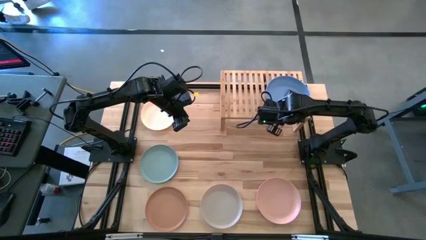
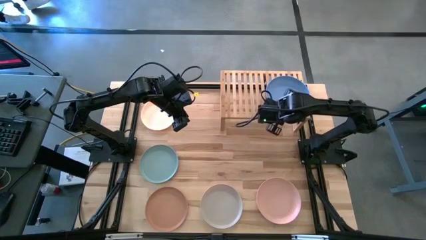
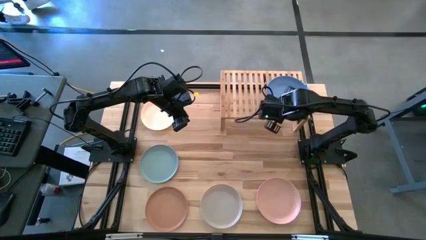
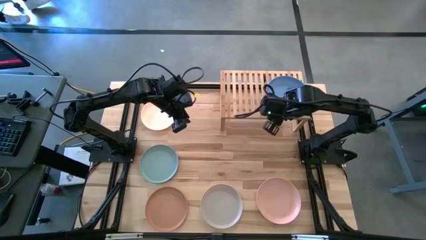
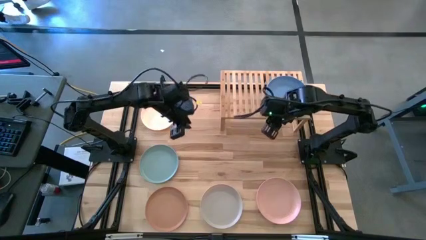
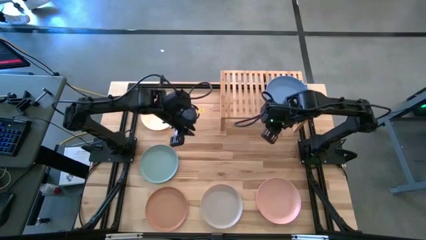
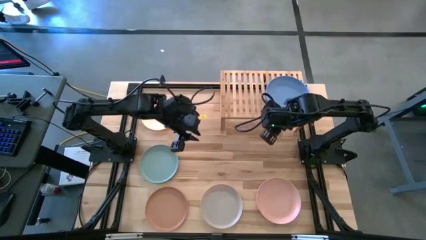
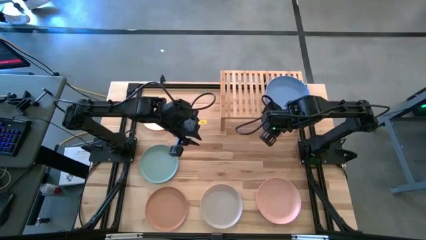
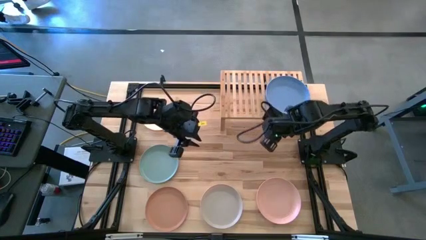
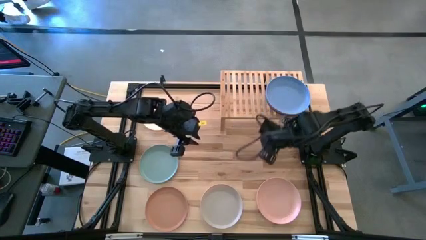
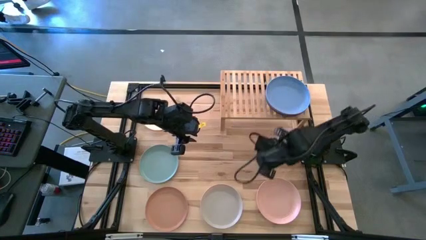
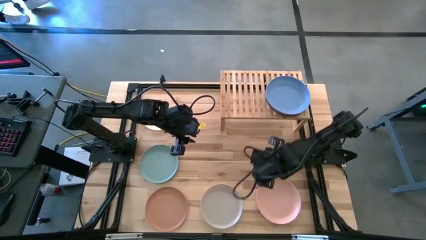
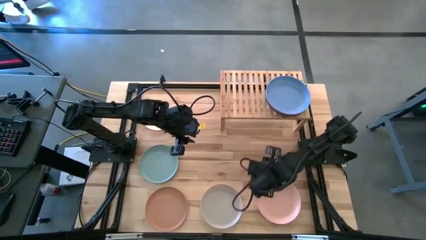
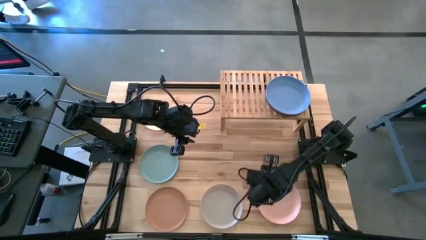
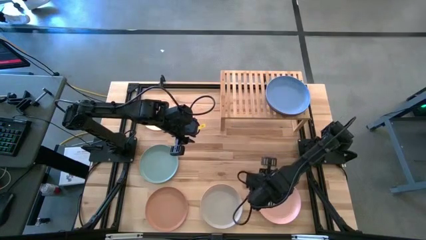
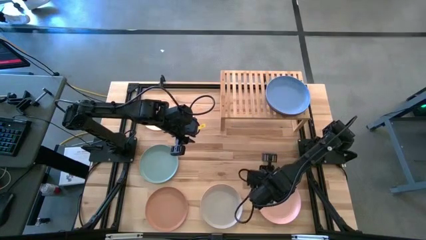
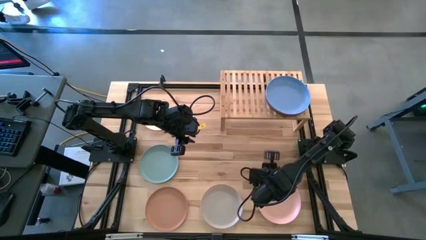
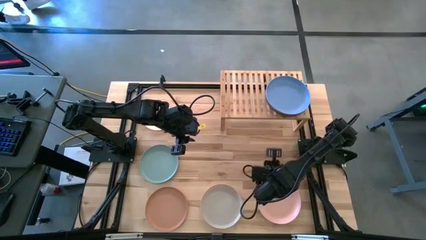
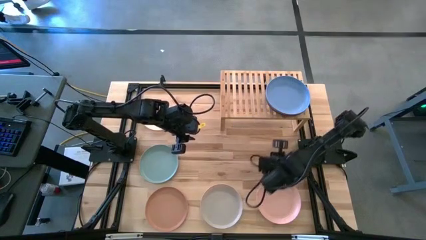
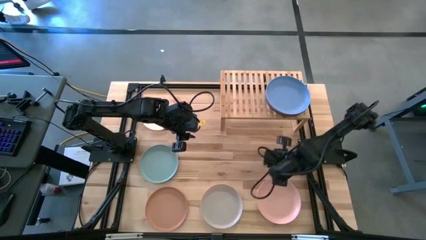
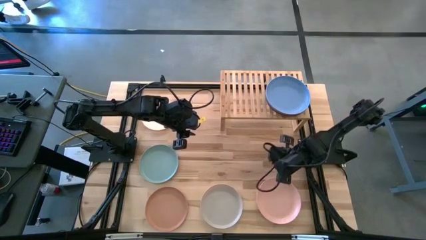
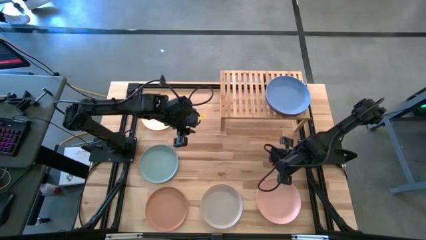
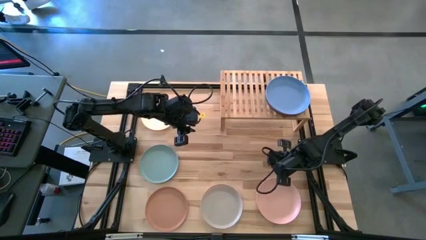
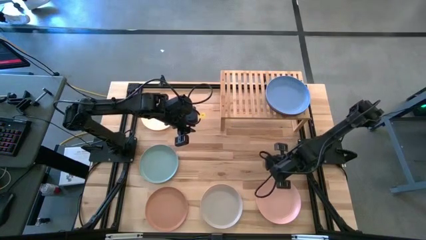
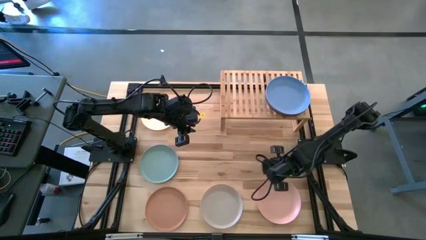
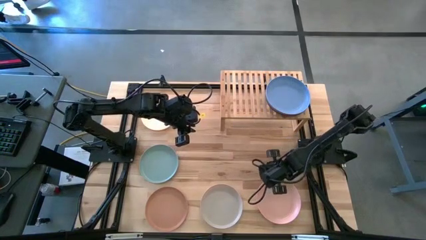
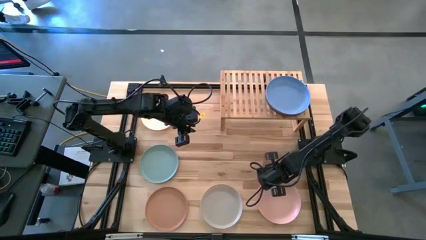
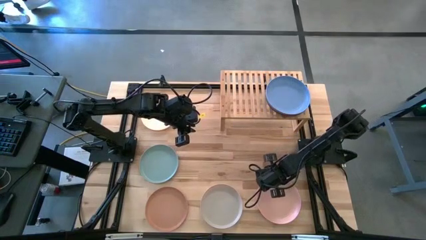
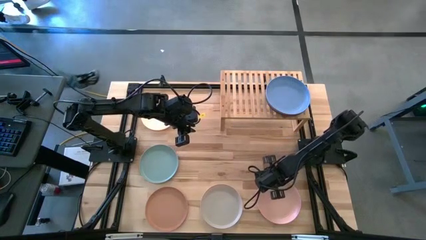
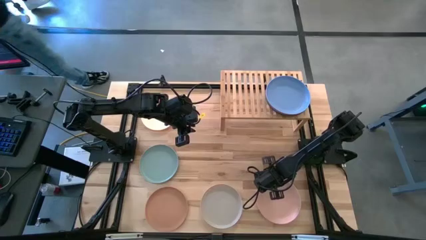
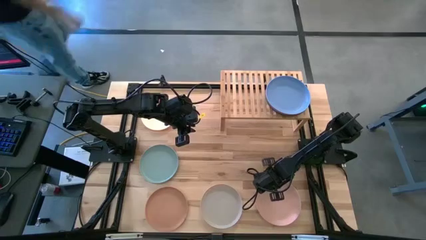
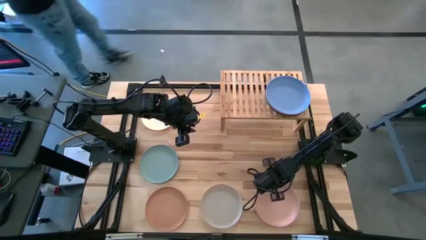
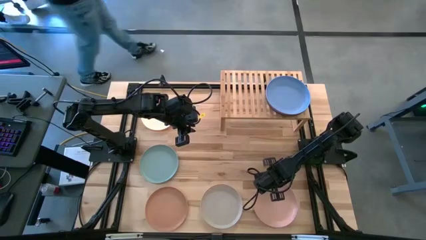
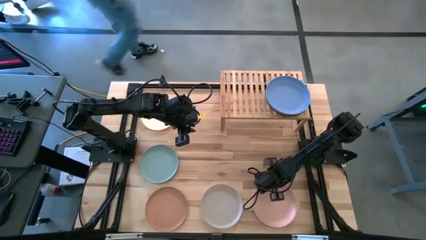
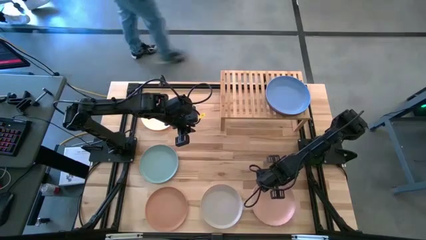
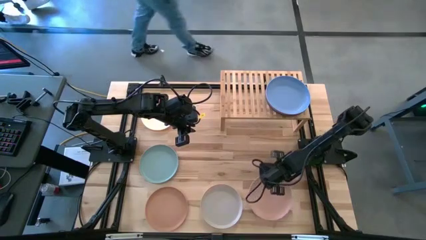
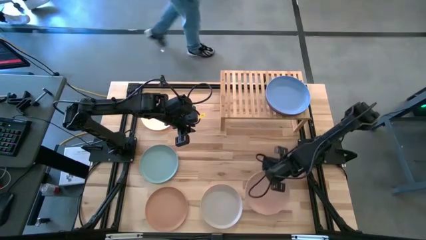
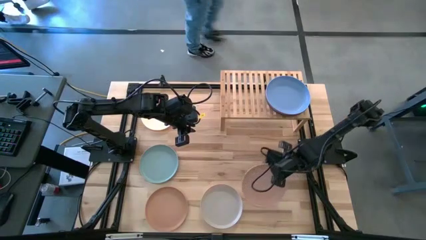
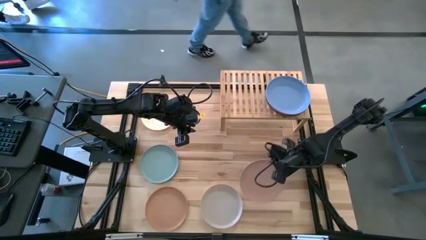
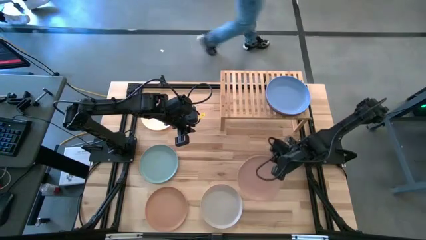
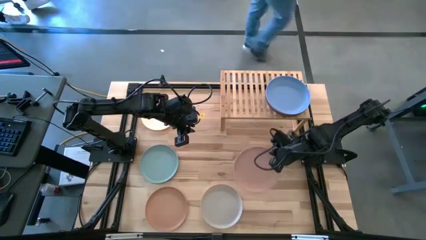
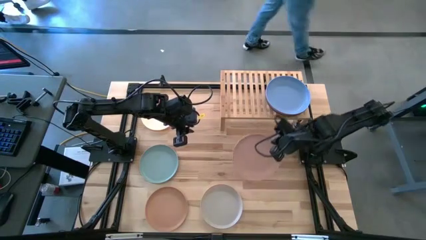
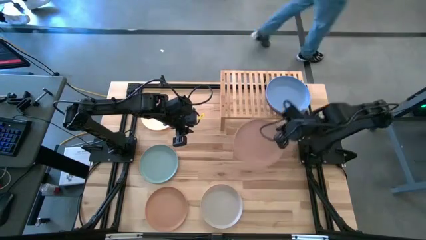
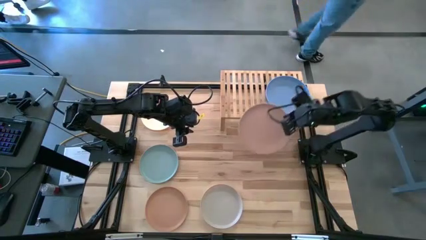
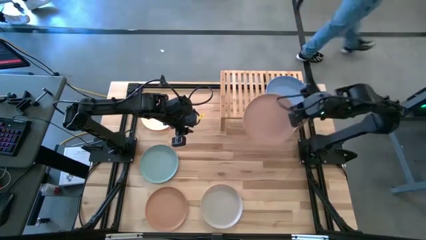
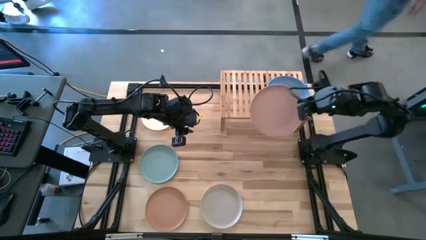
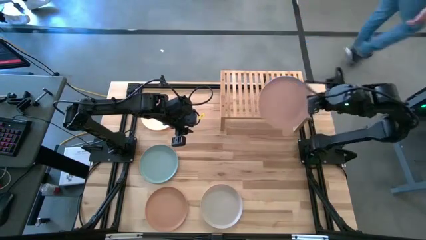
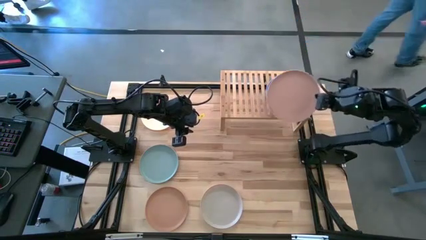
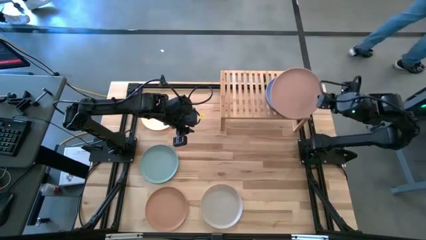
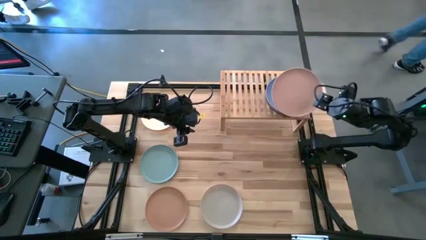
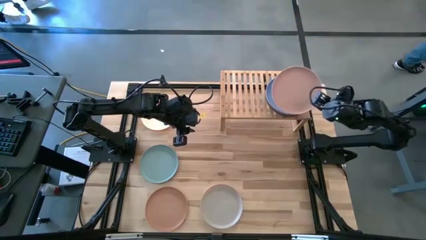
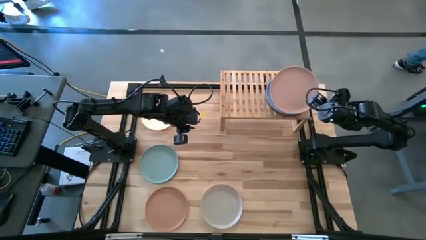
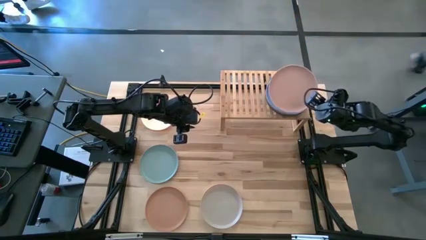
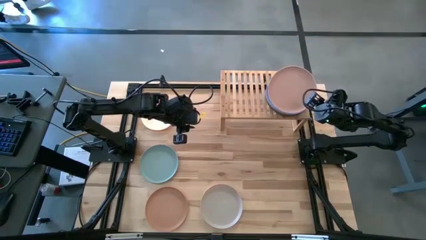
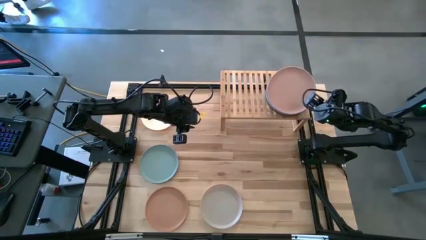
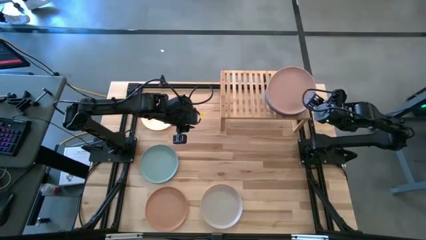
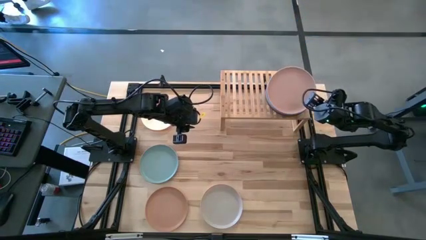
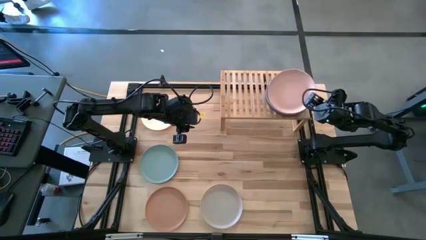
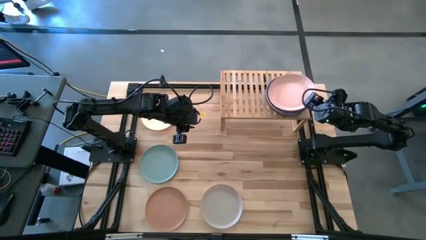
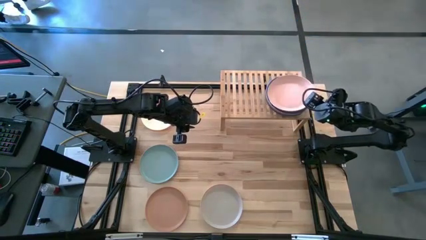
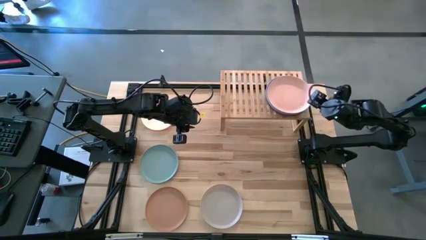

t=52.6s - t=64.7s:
Task: Place and stack plates onto a shelf
Stack the pink plate on top of the blue plate on the shelf
